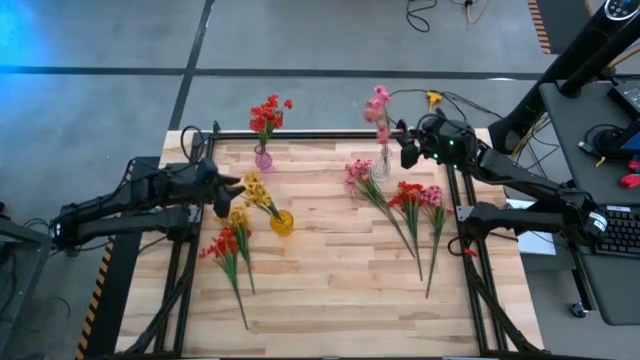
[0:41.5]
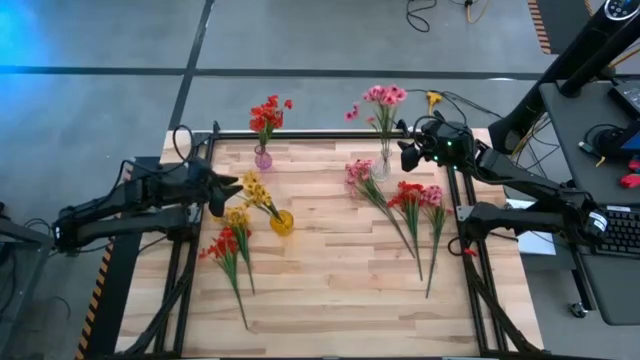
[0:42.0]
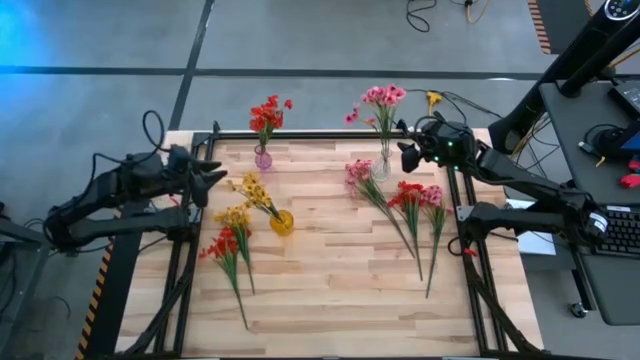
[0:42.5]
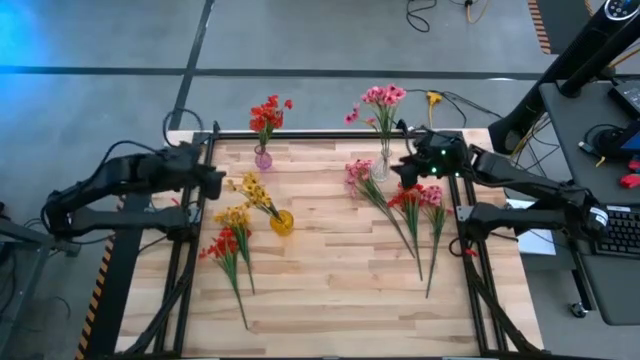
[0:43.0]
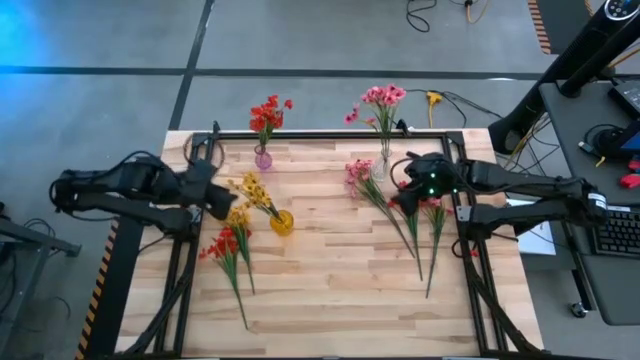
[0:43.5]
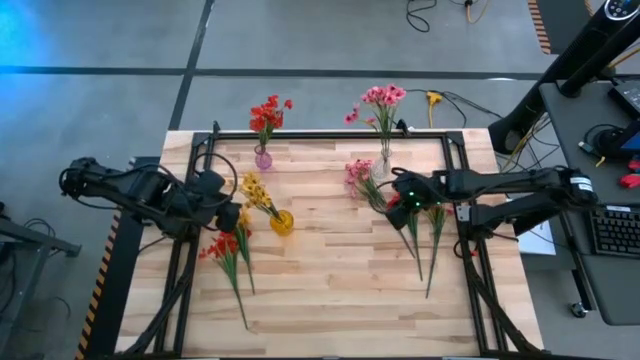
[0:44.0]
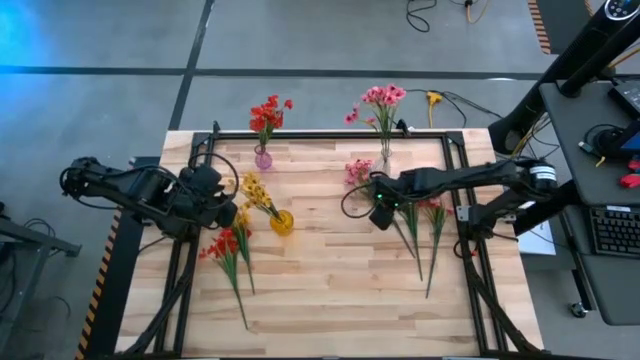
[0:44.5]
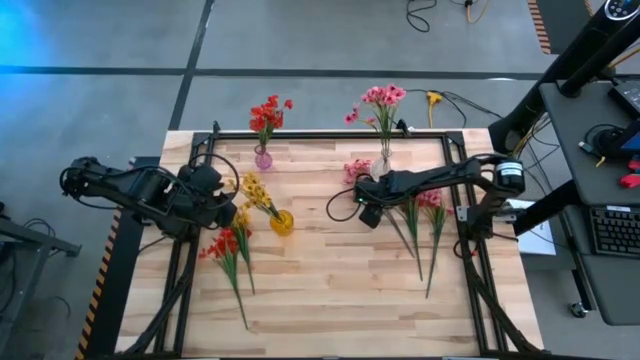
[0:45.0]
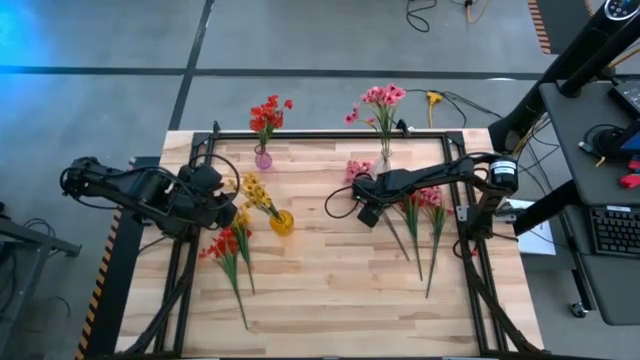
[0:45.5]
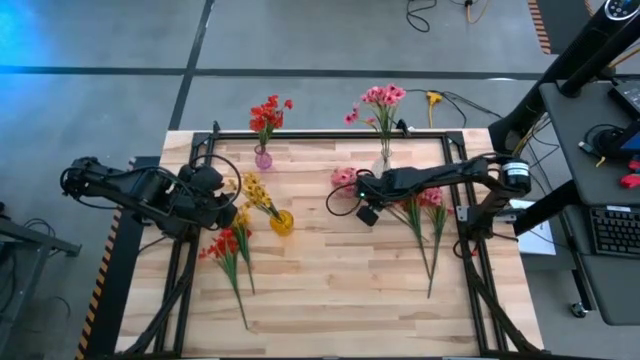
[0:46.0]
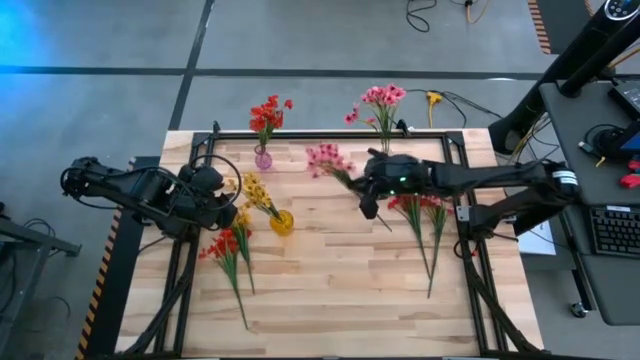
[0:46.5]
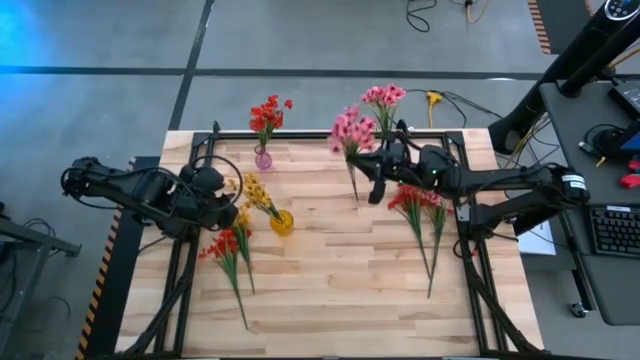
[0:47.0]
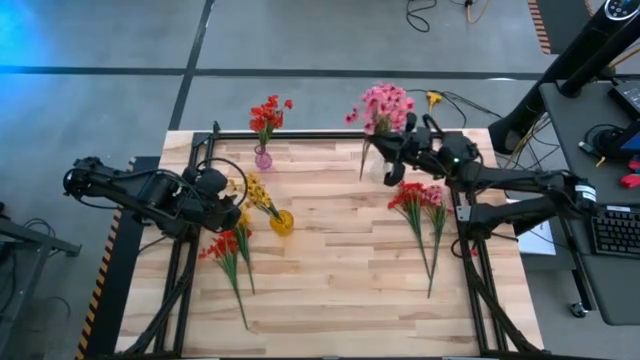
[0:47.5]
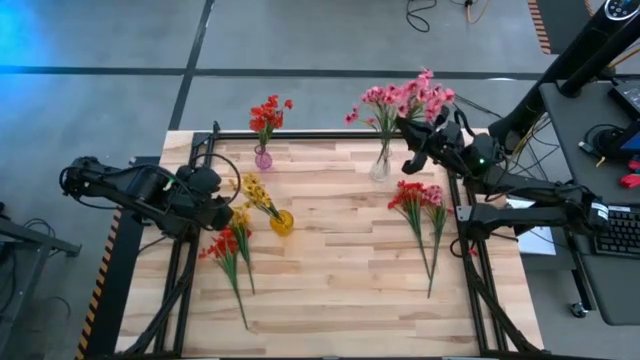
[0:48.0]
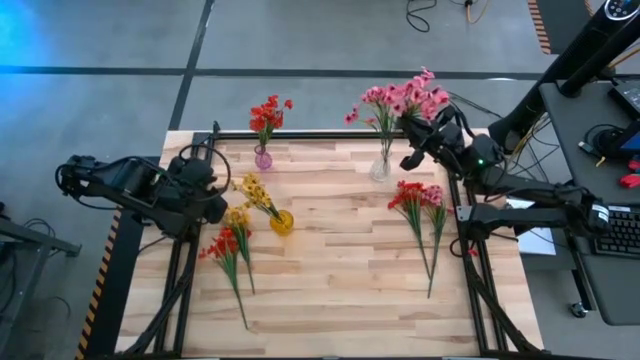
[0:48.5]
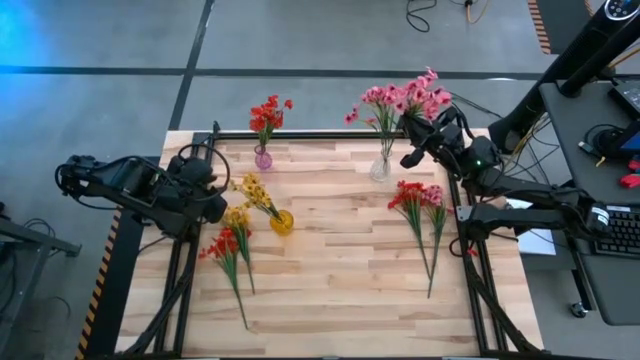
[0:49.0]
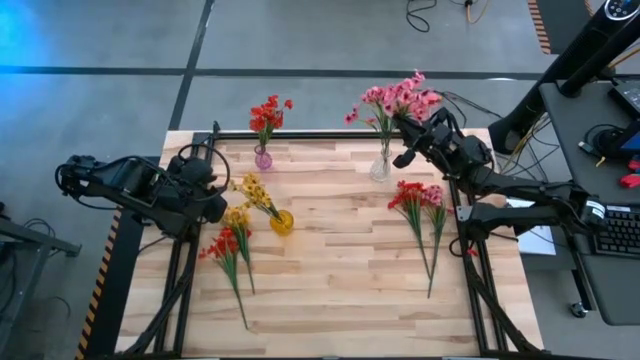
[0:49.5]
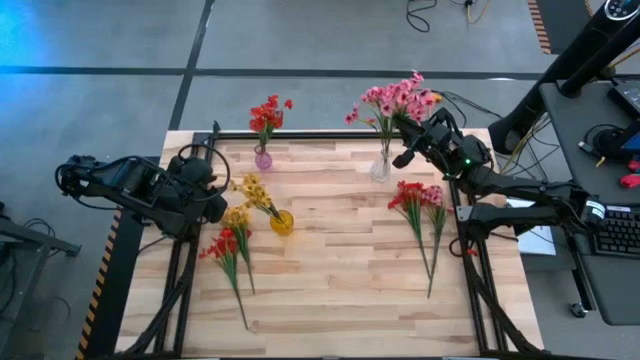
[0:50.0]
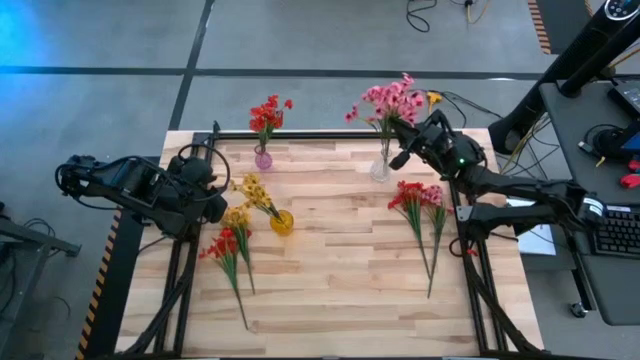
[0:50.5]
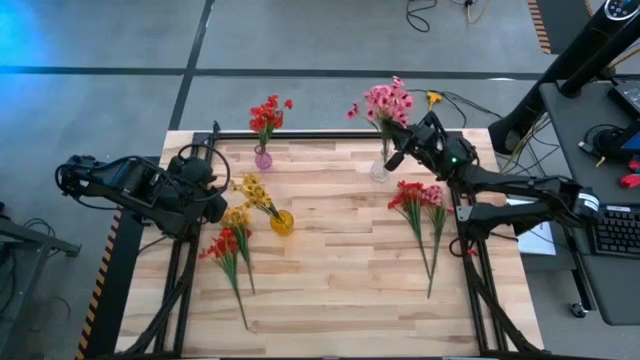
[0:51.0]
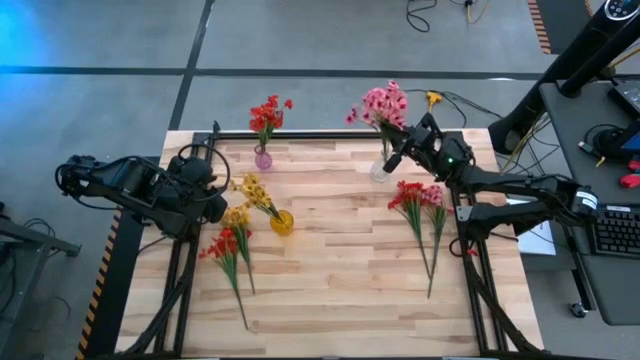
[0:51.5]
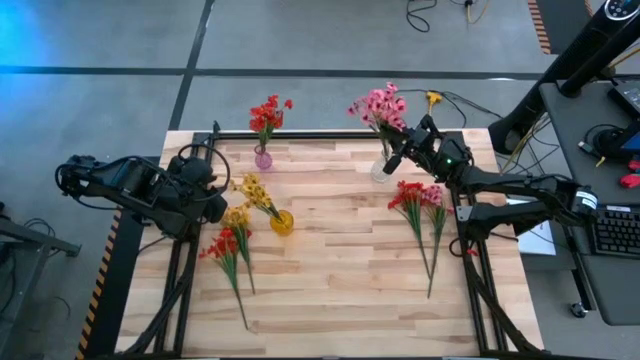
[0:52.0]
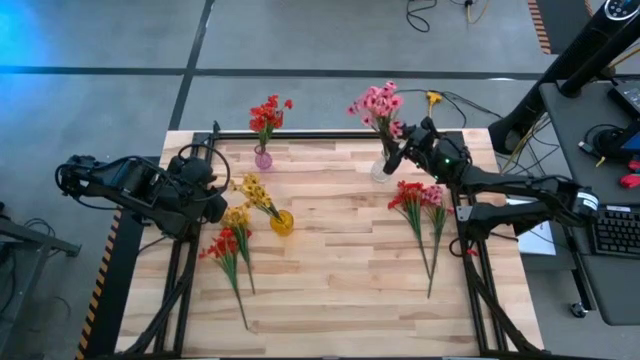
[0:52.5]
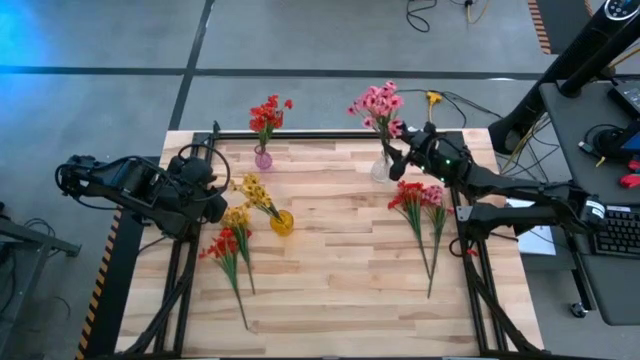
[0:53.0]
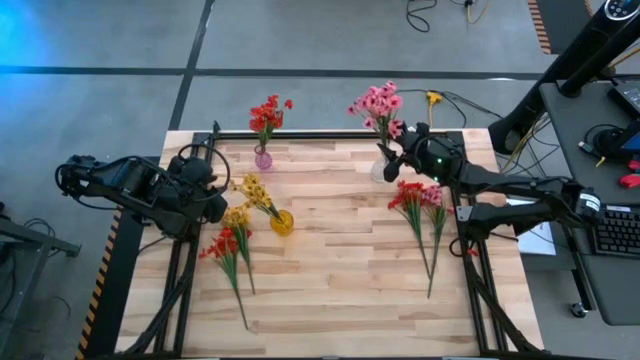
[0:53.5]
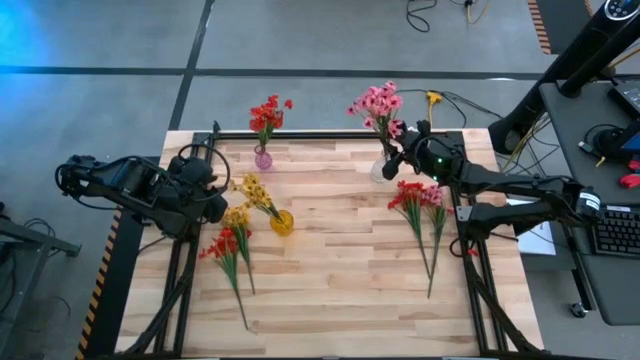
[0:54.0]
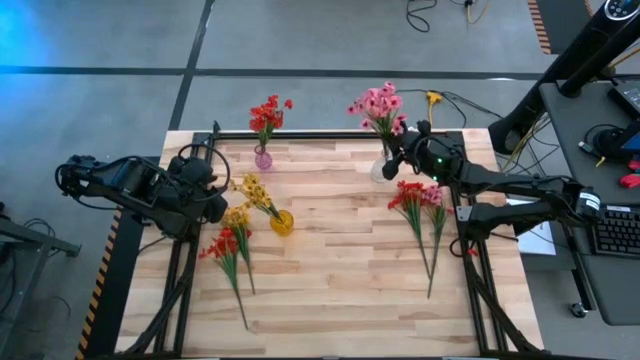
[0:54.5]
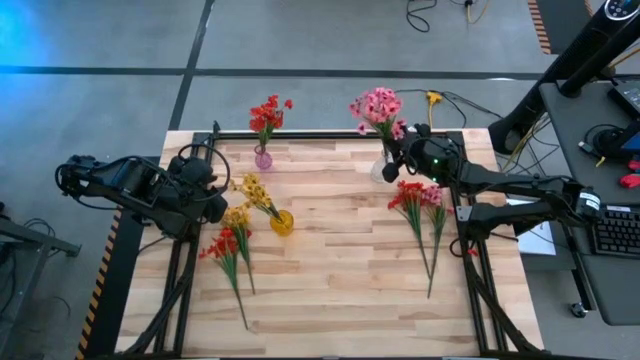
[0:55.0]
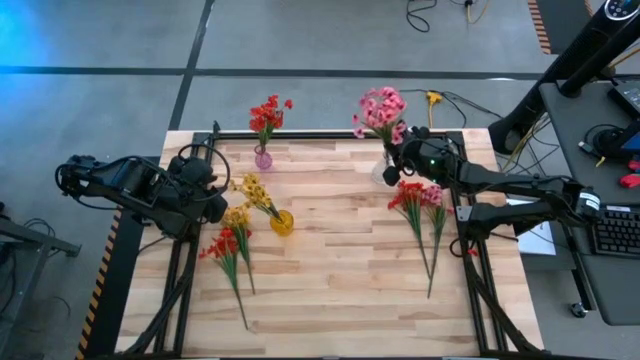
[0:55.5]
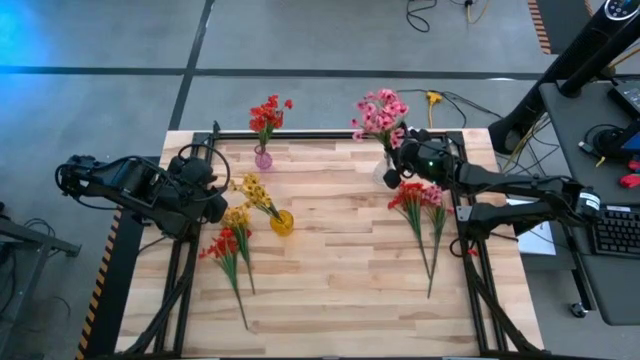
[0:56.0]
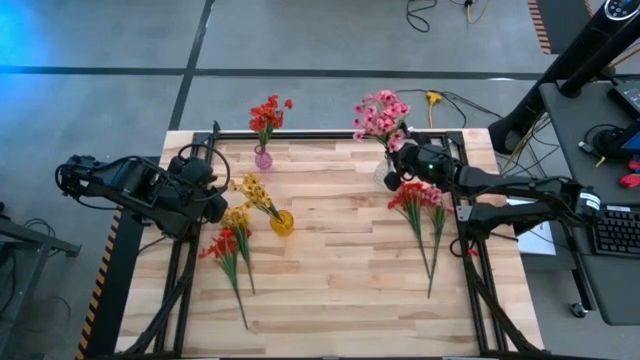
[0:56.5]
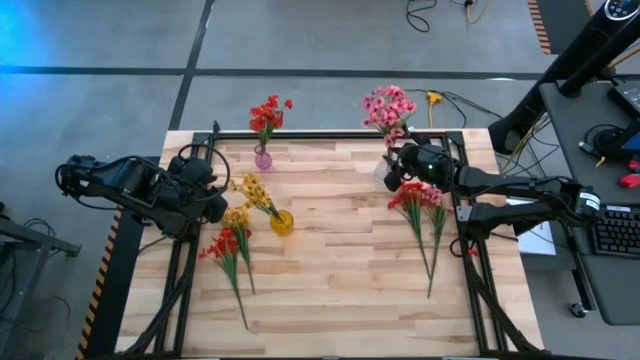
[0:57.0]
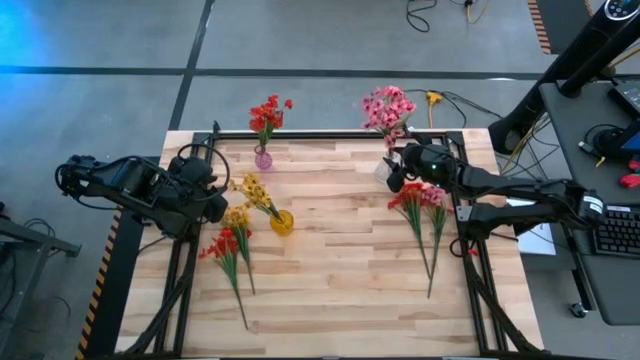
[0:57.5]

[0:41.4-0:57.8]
Task: Sort flowers into vase by color
Put the left pink flower into the transparent flower vase
